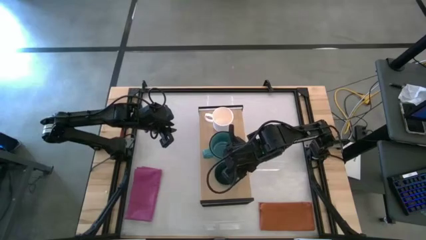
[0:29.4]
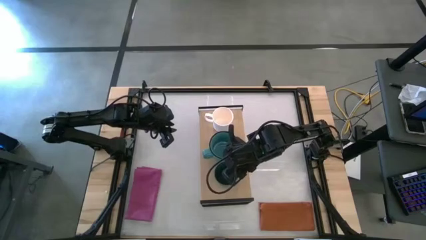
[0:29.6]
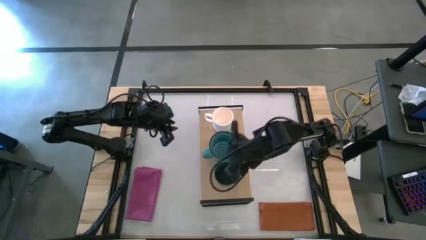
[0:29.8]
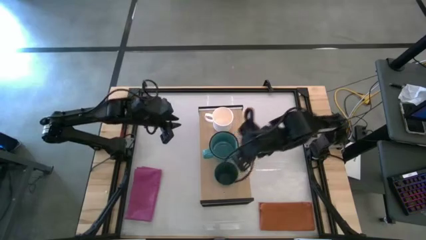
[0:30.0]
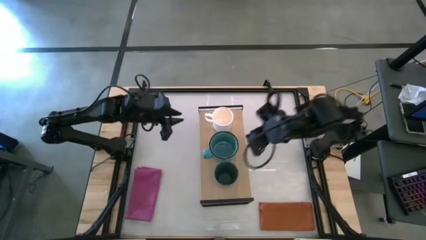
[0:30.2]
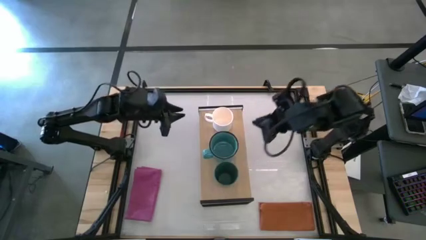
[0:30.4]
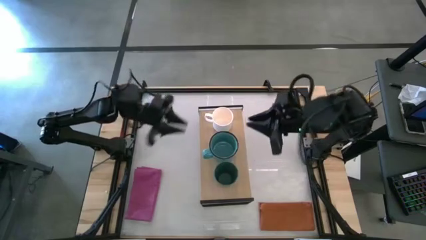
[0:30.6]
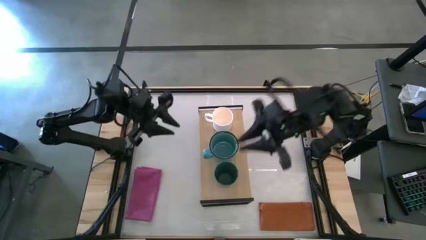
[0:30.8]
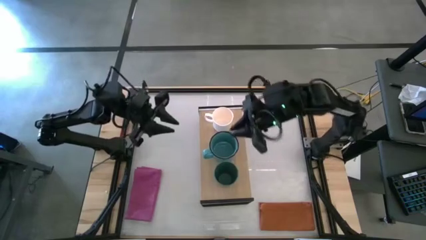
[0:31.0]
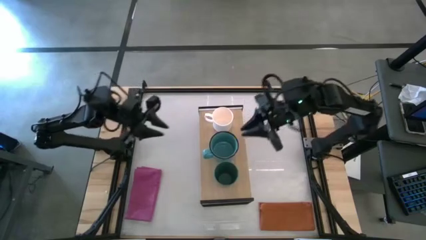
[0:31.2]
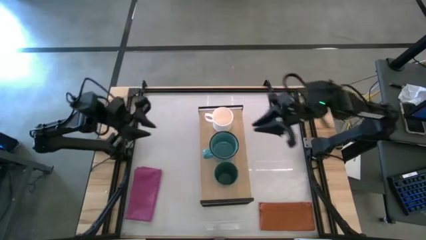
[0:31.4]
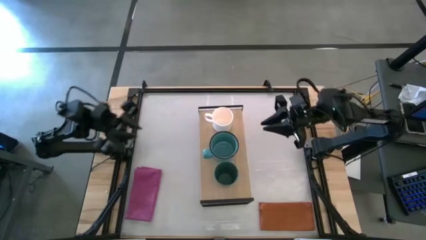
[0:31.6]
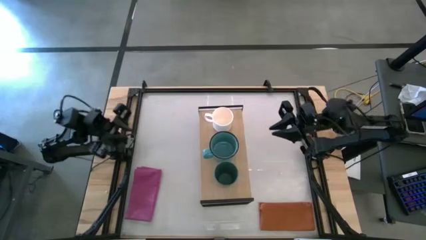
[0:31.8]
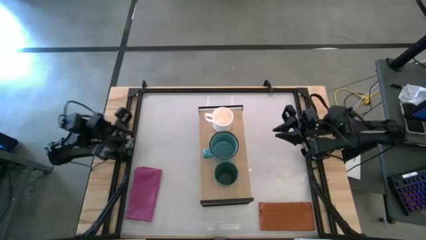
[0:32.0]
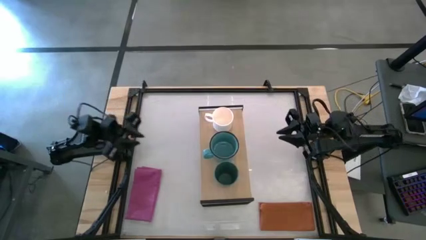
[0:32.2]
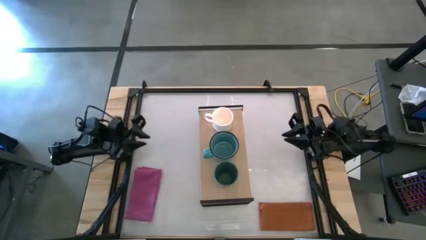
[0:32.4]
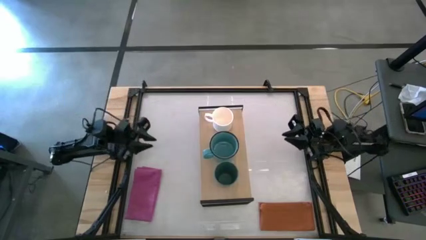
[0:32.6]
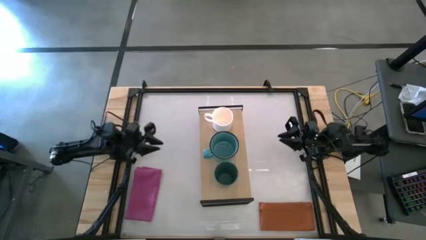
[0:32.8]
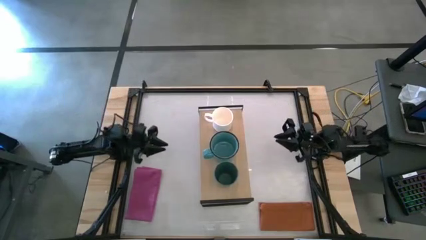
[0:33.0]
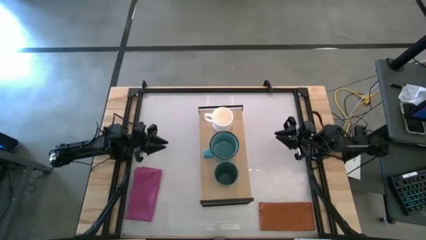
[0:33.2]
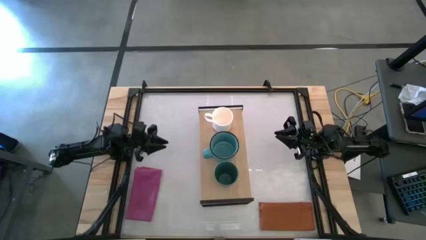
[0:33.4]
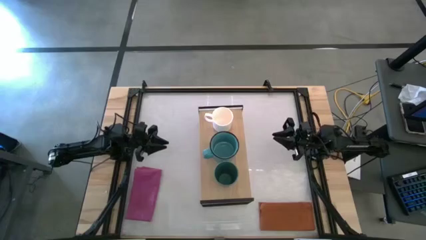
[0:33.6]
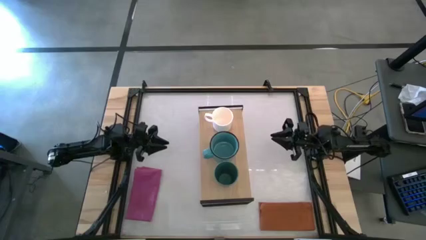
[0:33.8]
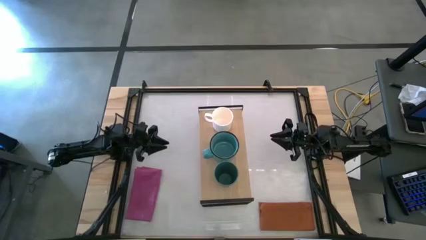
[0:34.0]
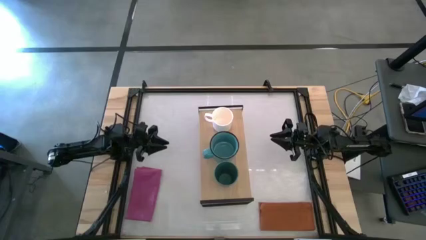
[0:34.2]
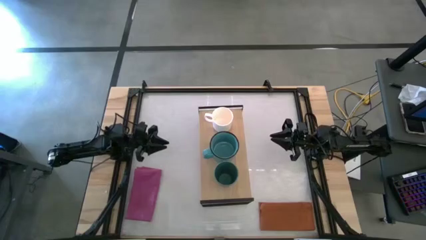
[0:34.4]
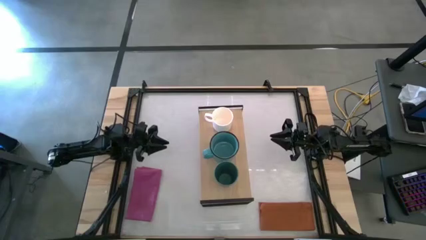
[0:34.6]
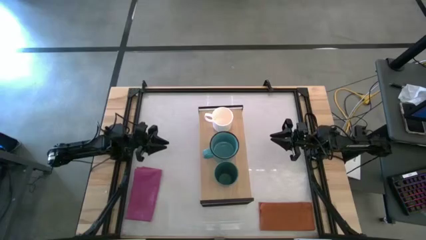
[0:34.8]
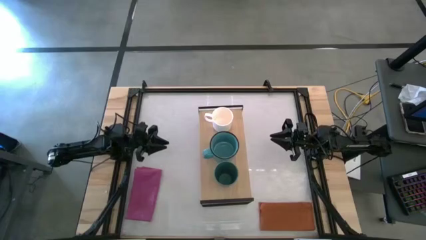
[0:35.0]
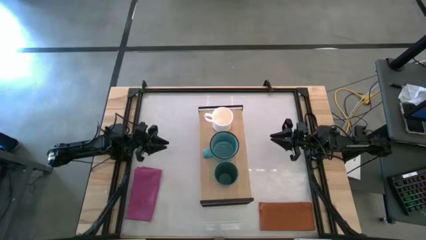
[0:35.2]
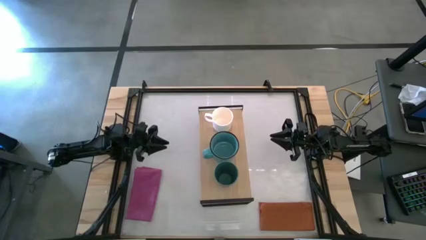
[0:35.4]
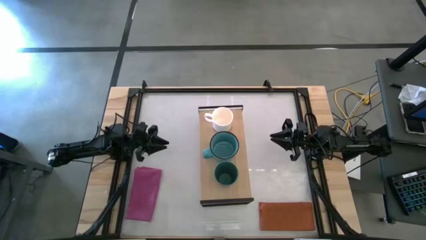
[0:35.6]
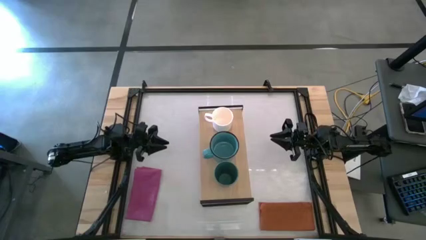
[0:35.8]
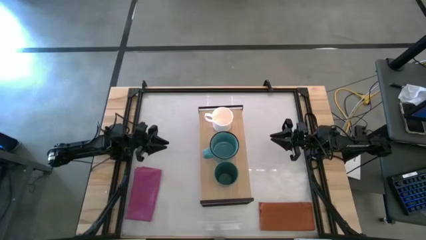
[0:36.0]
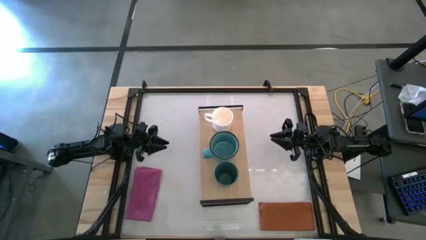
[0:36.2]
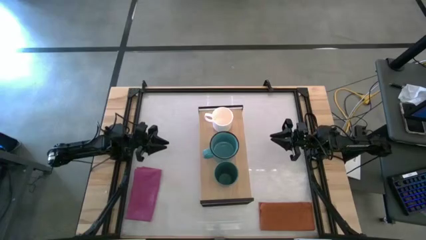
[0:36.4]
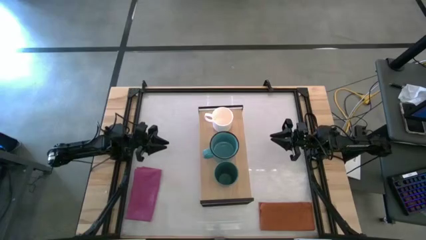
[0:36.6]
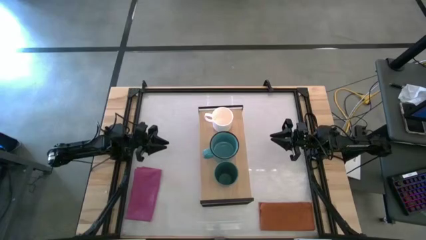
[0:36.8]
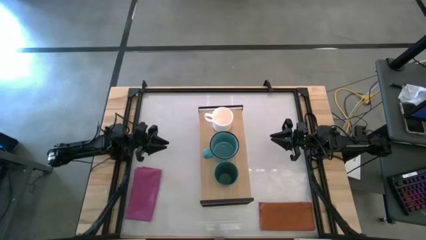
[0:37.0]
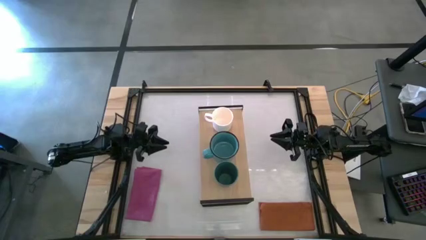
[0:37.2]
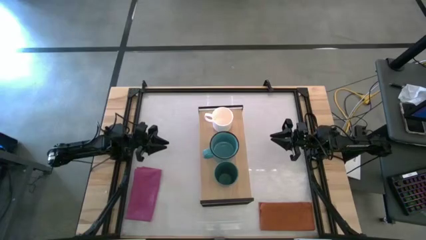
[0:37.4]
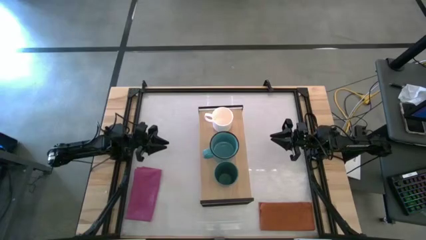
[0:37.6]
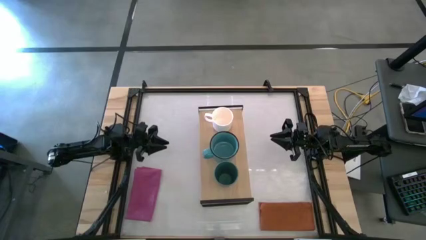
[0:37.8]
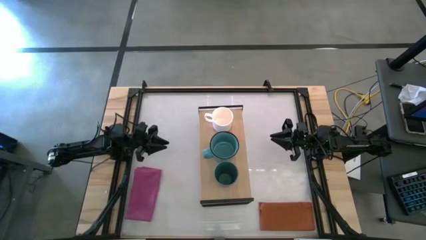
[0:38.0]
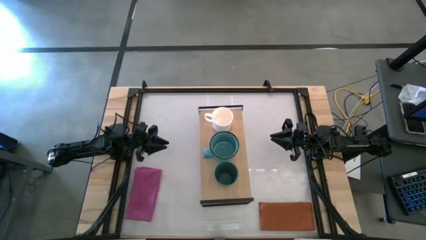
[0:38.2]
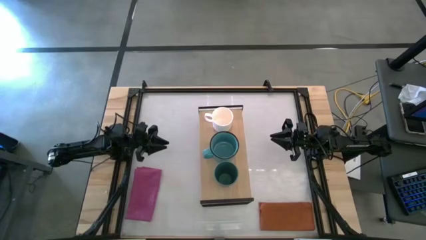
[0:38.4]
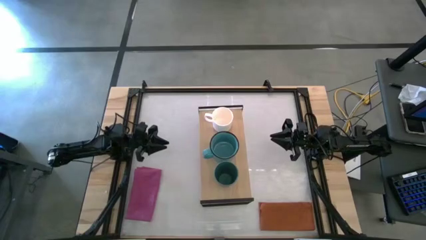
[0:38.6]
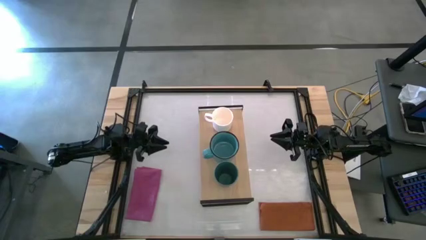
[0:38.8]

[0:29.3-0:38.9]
Task: Stack small to large cups/mugs on shelf
Return to Home Position

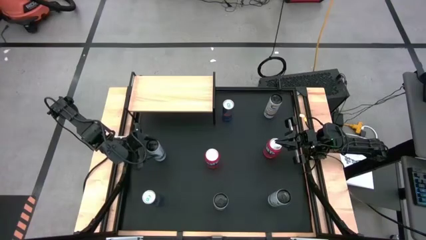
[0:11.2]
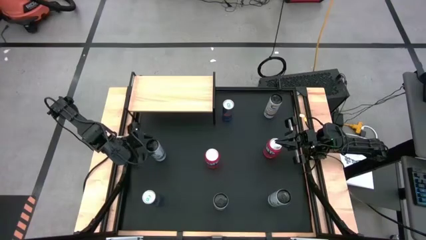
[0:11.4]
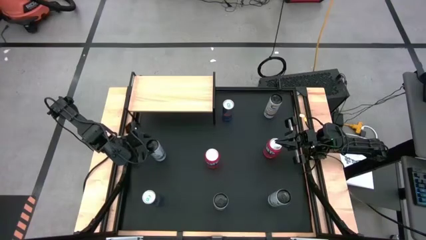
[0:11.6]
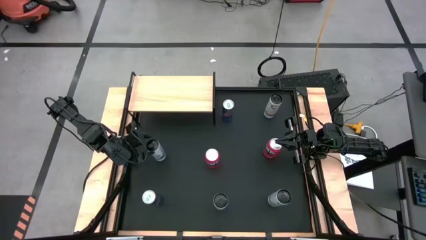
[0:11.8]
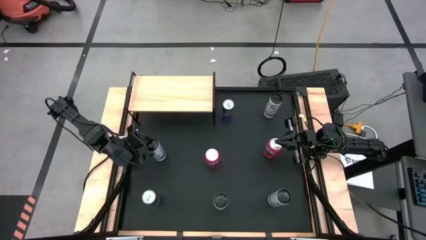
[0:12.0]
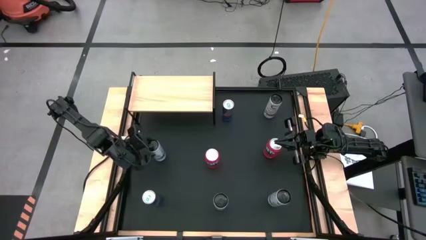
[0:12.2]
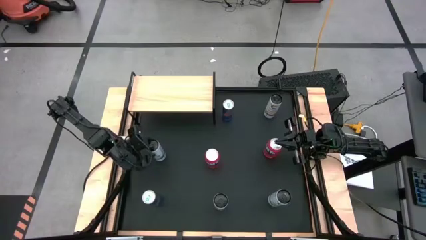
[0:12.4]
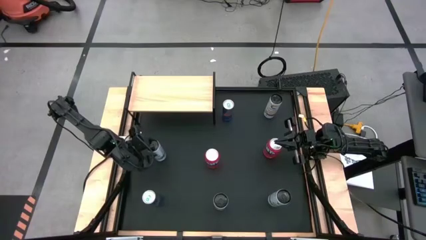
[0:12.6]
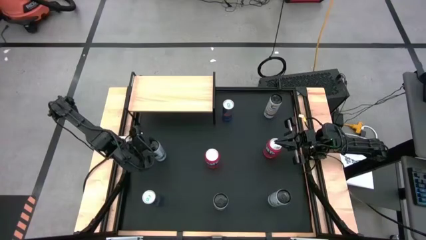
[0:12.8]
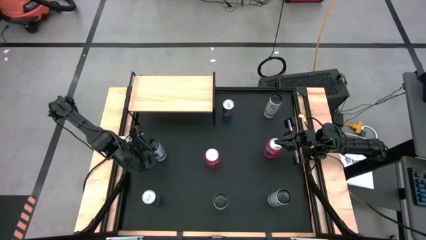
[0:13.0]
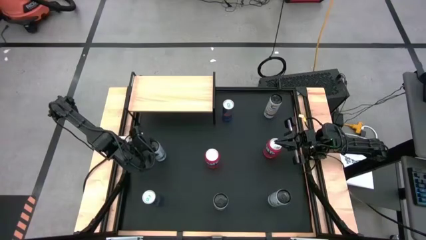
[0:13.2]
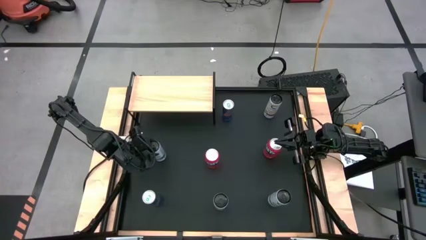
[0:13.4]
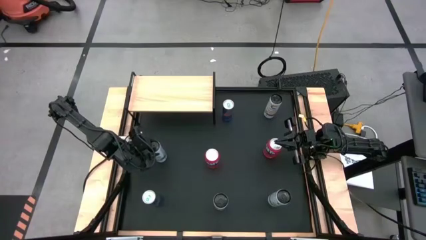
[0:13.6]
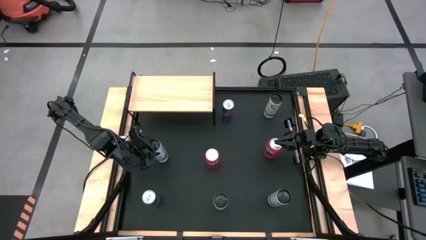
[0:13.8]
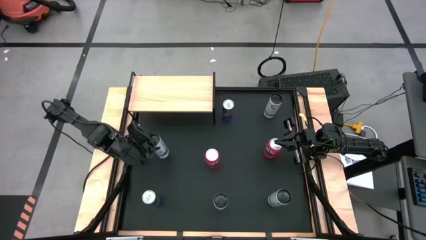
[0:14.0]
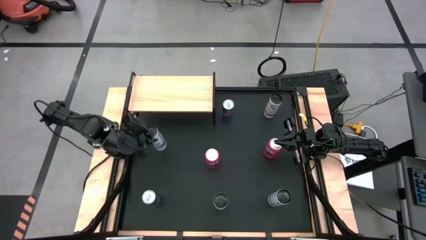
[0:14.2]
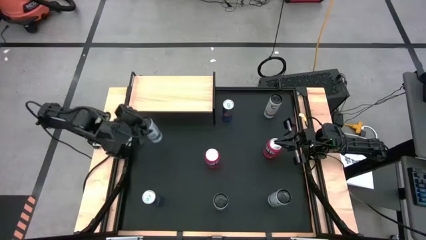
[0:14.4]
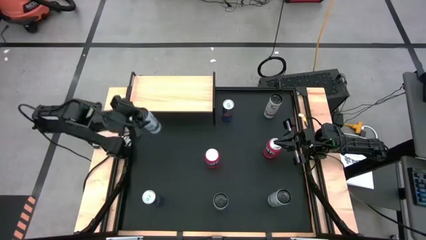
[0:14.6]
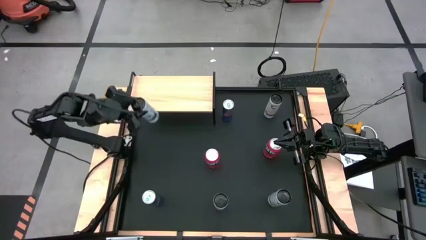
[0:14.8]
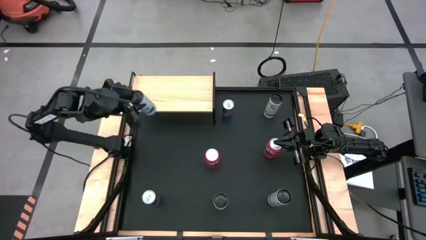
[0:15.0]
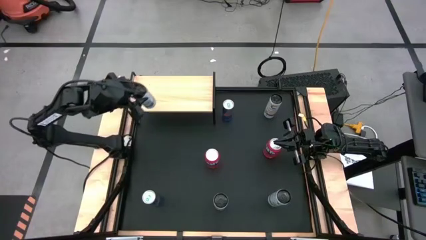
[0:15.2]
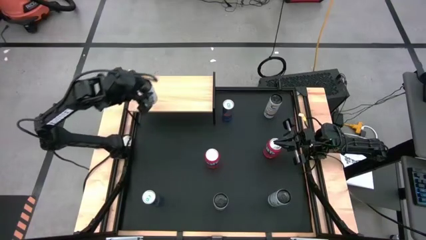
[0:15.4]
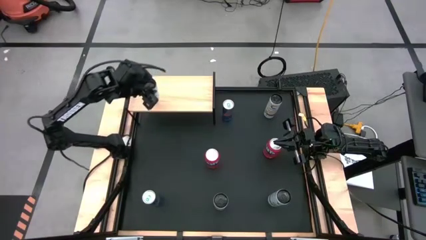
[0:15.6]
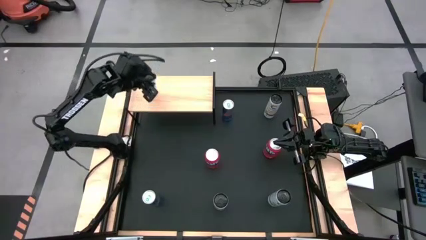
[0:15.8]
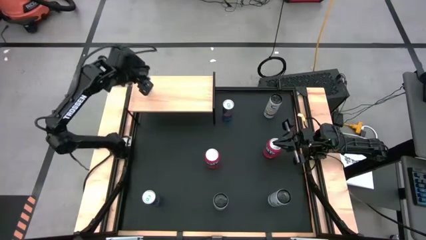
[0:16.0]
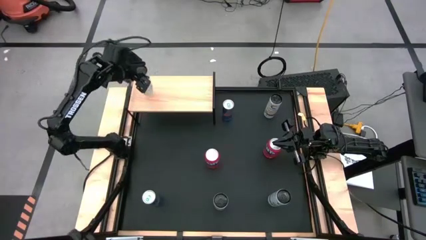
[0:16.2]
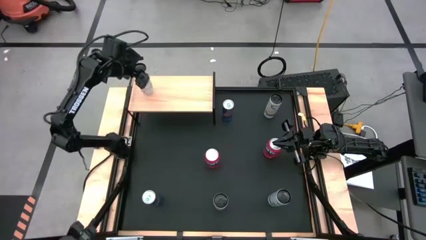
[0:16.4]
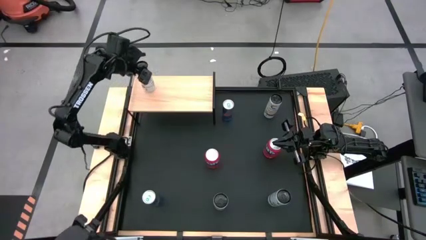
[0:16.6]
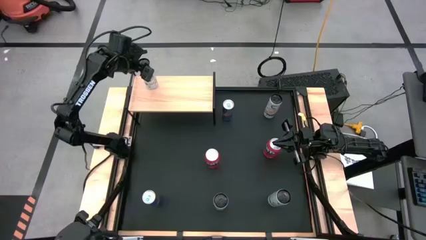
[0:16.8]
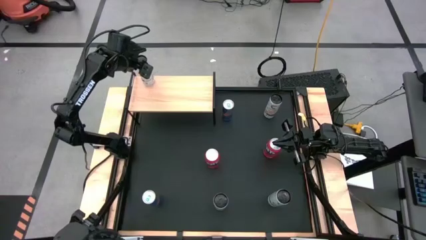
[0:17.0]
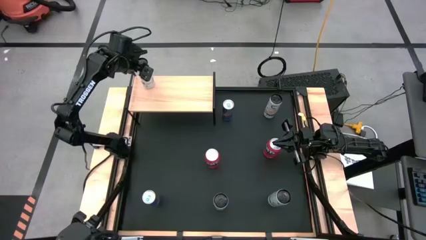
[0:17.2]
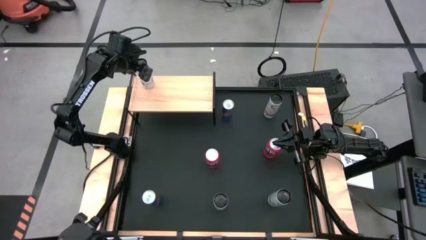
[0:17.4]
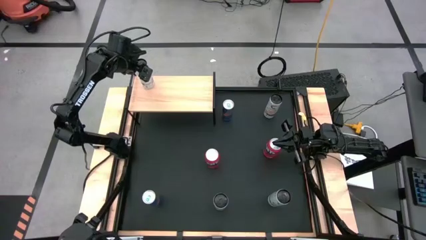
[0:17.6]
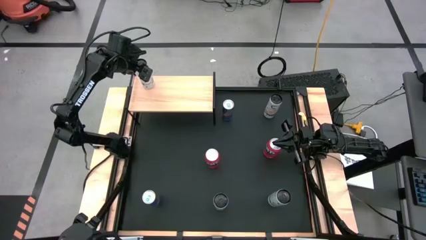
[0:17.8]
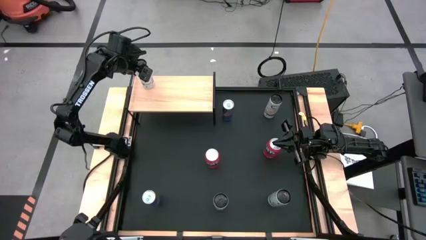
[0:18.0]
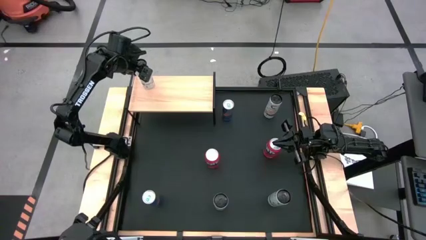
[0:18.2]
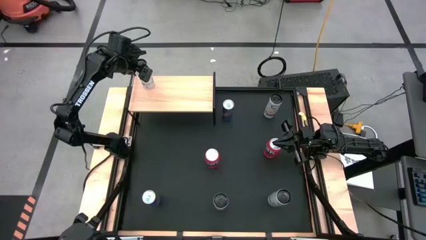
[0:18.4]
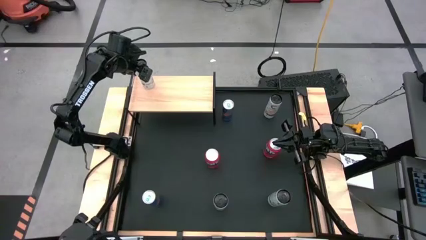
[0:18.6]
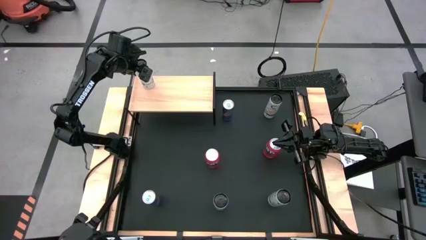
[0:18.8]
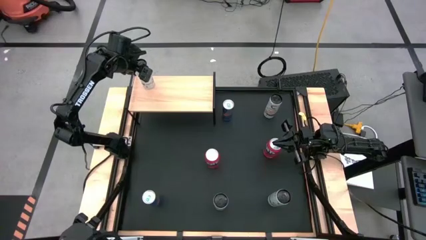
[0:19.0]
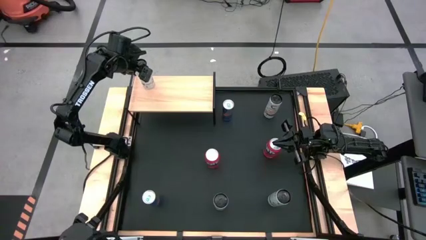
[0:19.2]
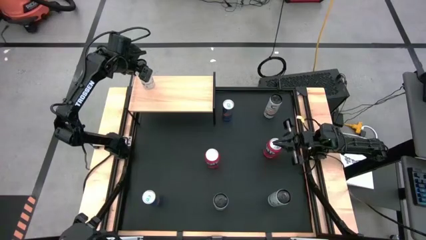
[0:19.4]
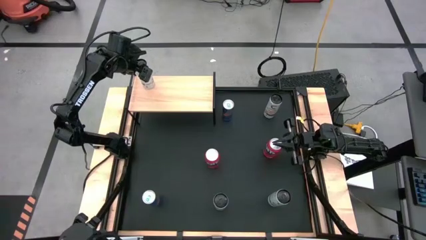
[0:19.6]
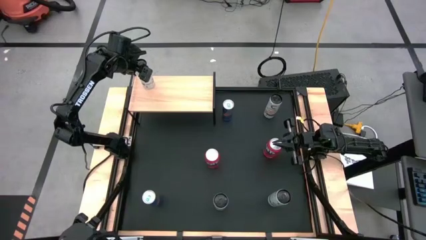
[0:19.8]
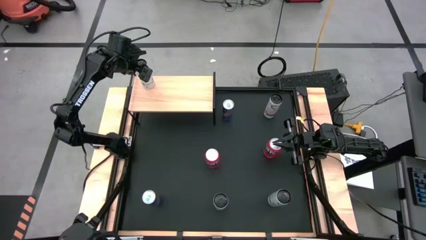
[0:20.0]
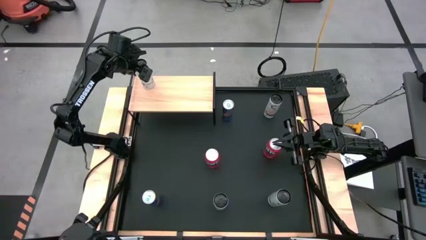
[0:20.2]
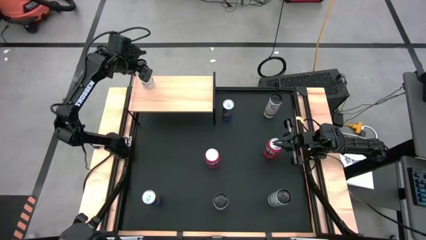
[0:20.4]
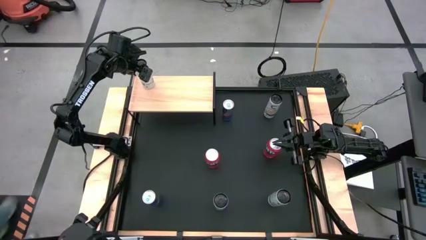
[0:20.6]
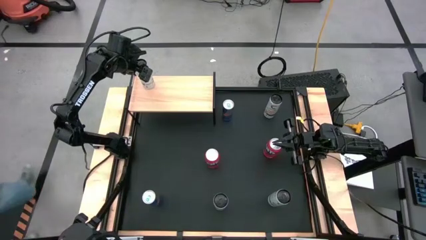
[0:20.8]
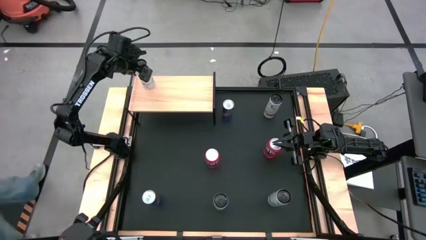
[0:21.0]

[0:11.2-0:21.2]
Task: Place canned beverage on shelf
Put the left white-blue soda can on the shelf
